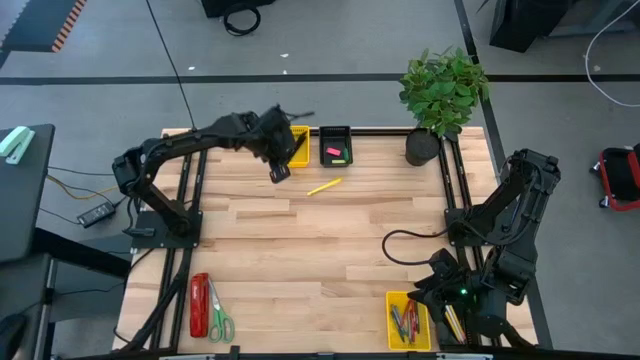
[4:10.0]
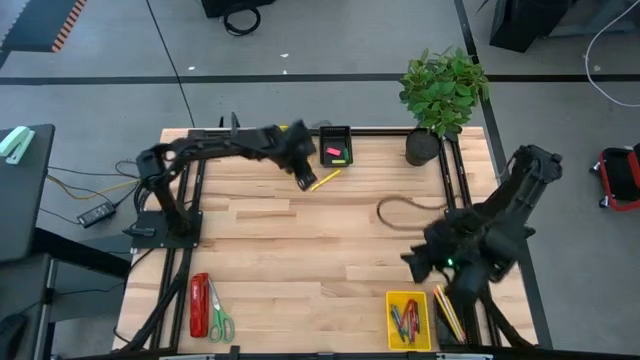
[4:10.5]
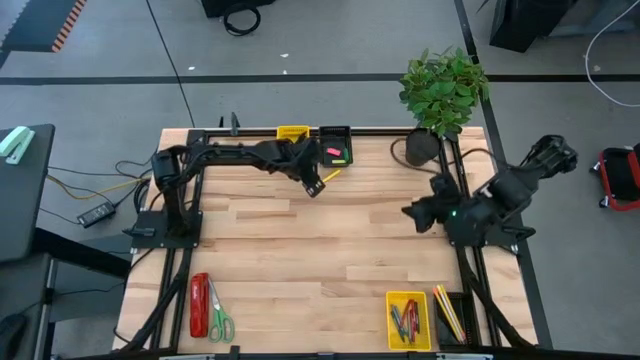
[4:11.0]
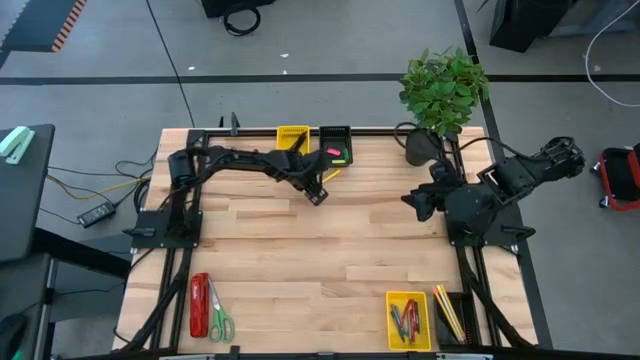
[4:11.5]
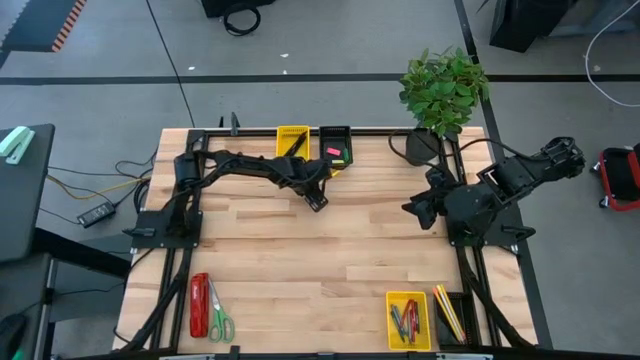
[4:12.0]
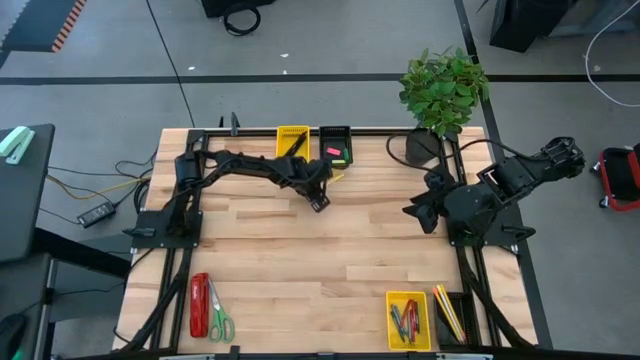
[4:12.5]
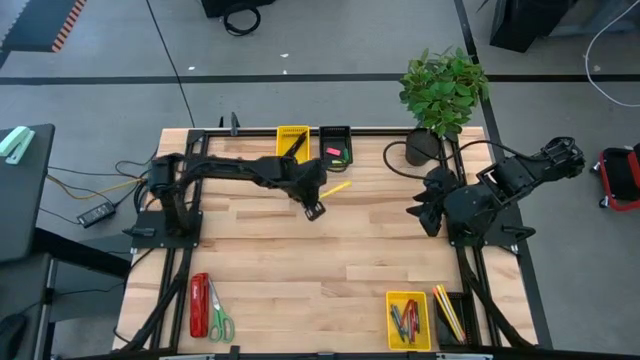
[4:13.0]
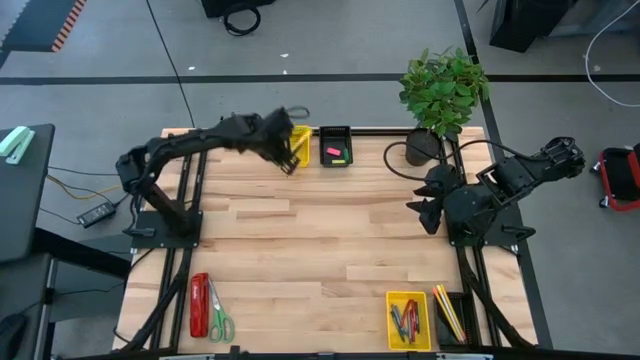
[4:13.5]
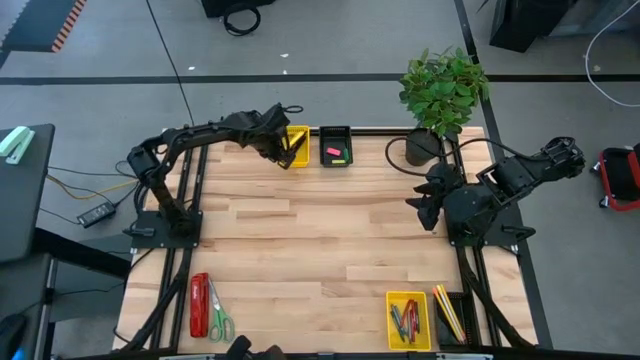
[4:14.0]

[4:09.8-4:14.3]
Task: Sort crayons/erasers/pens/pencils in bins
Put the yellow pen into the top yellow bin

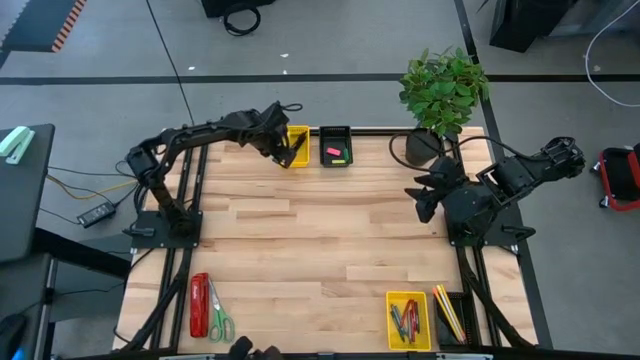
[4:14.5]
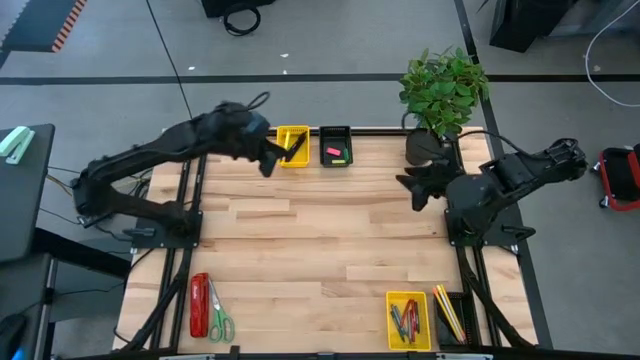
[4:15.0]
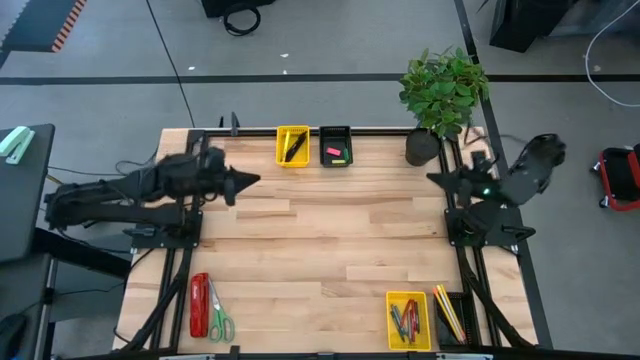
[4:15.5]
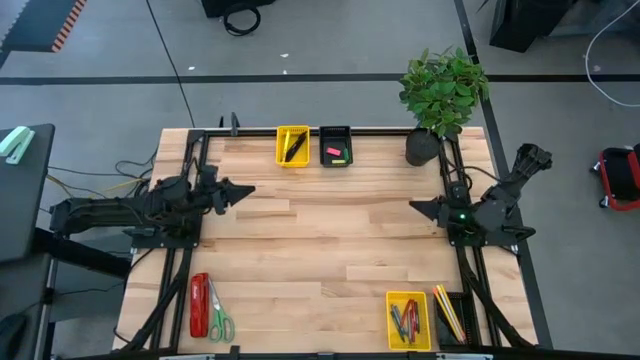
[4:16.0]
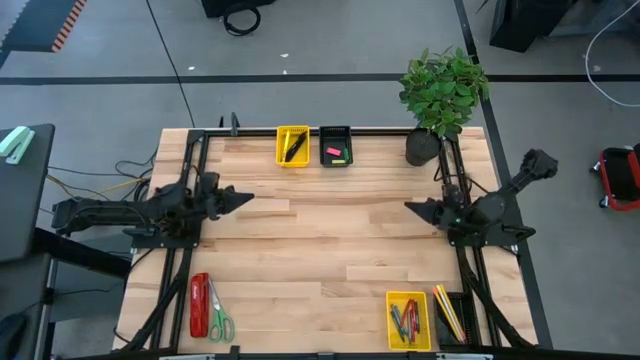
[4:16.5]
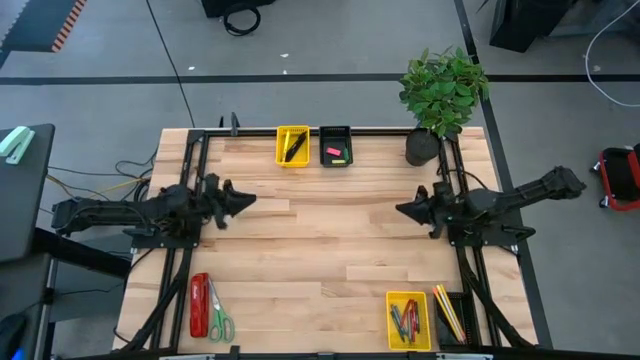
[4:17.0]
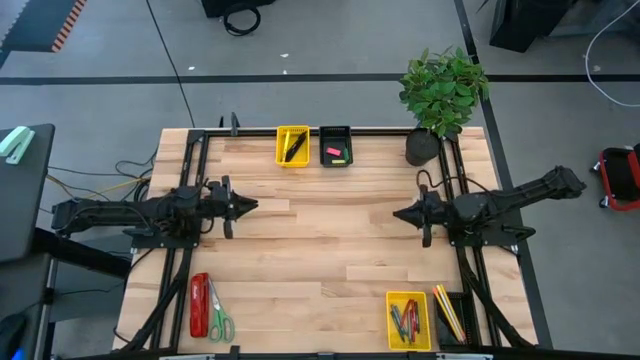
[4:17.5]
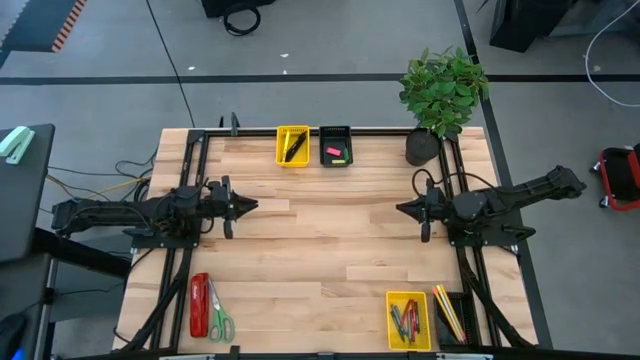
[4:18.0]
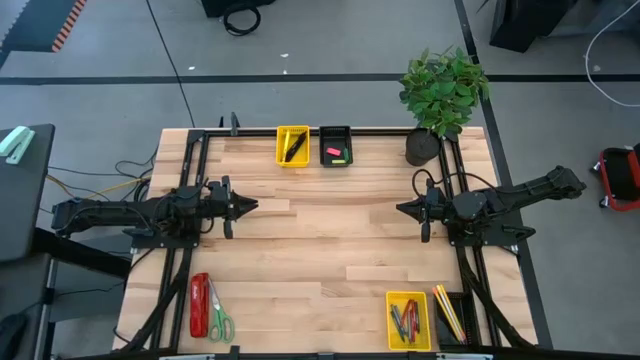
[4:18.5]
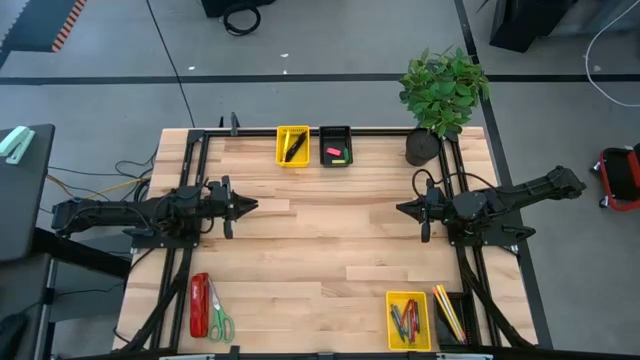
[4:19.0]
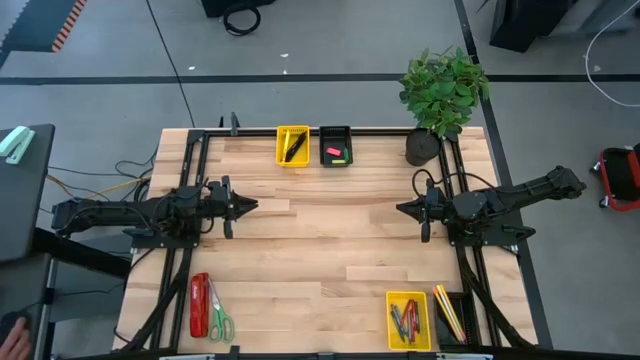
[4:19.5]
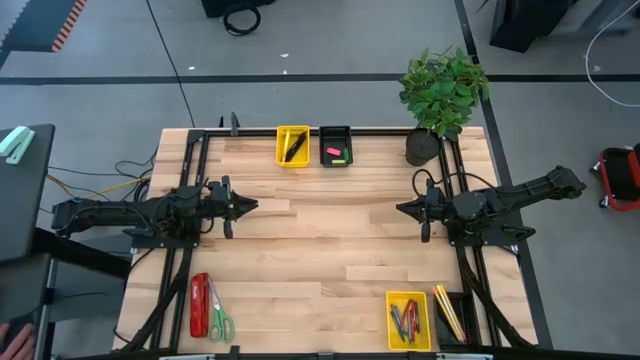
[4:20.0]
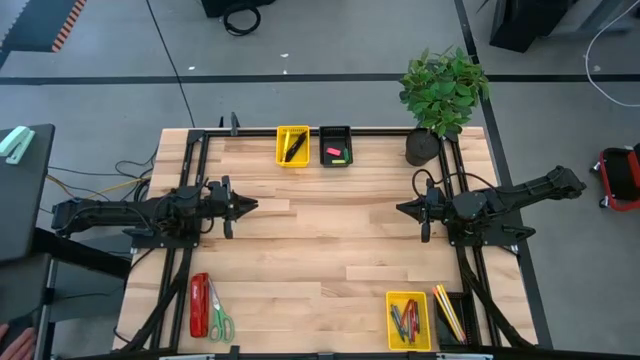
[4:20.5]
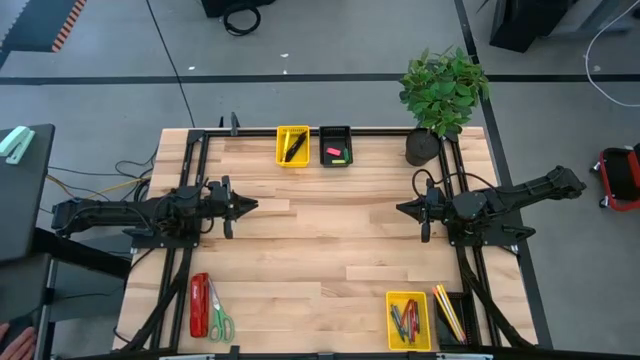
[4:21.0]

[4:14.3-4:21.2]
Return to Home Position

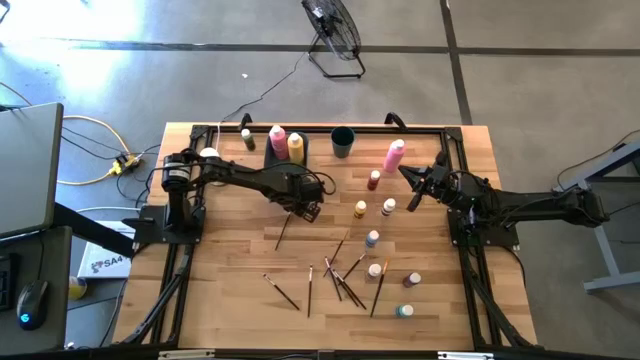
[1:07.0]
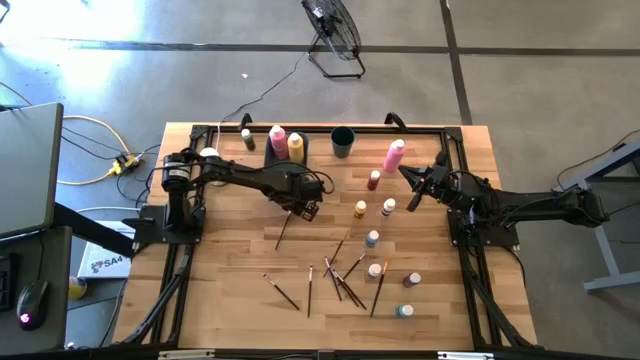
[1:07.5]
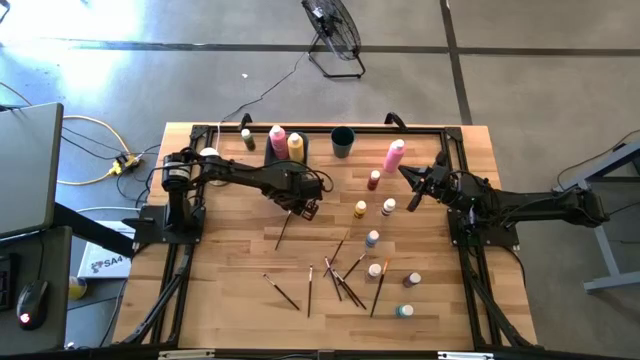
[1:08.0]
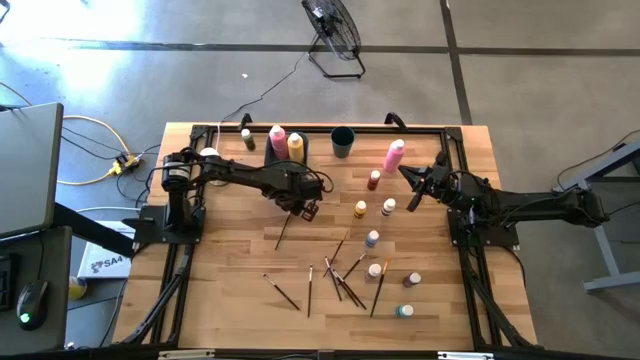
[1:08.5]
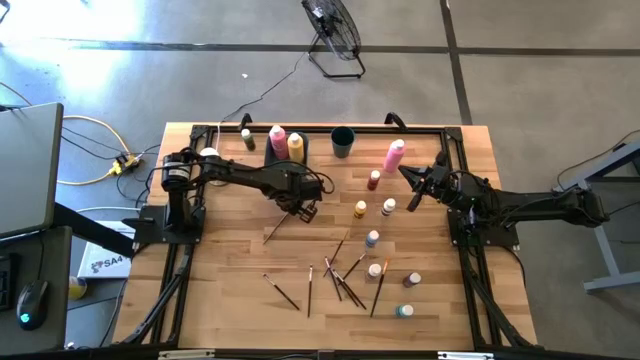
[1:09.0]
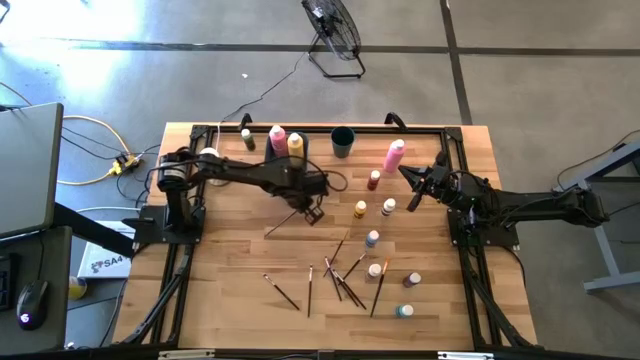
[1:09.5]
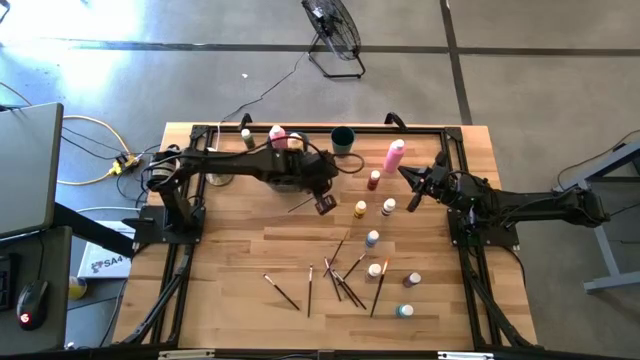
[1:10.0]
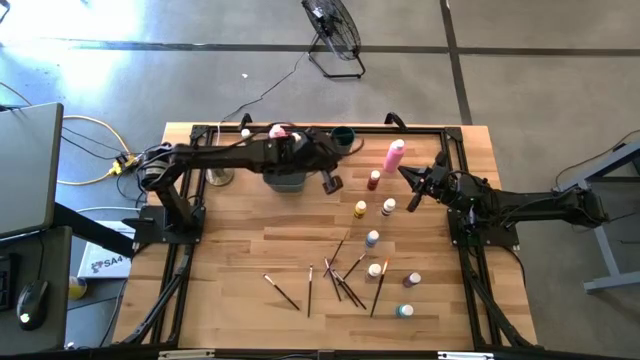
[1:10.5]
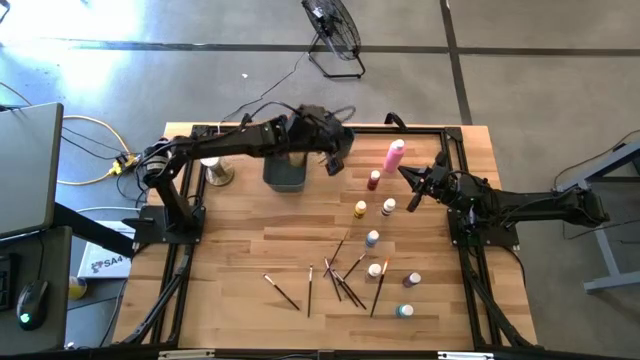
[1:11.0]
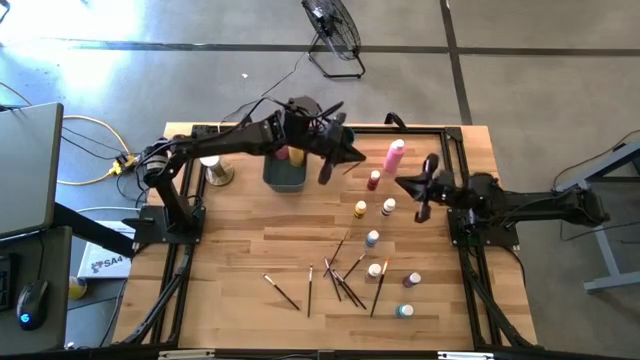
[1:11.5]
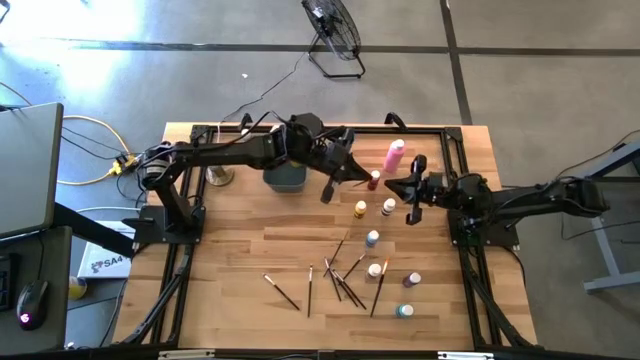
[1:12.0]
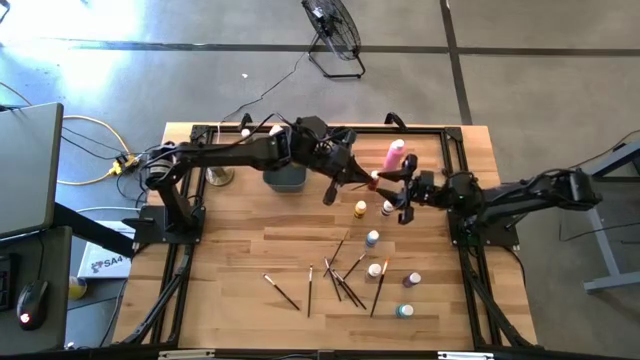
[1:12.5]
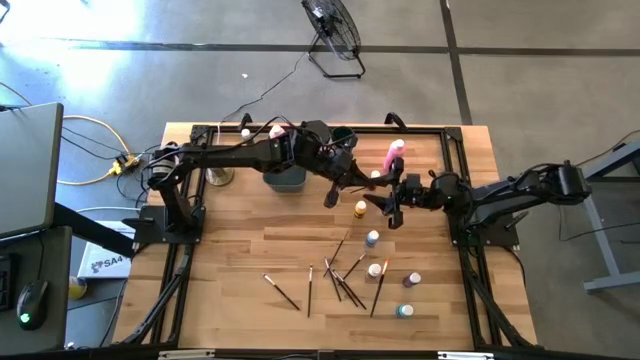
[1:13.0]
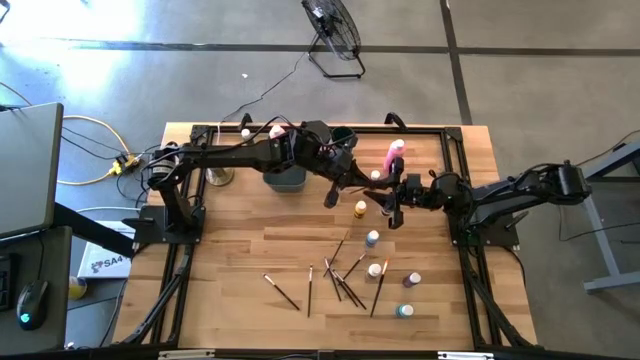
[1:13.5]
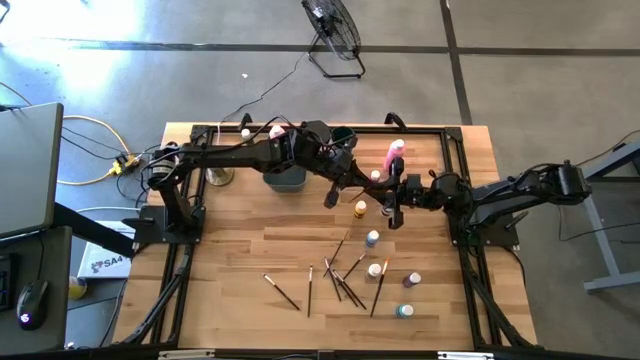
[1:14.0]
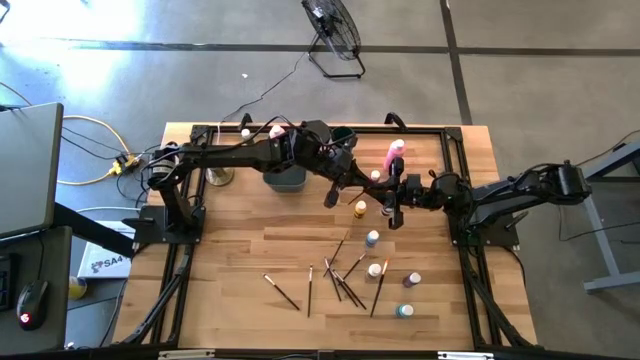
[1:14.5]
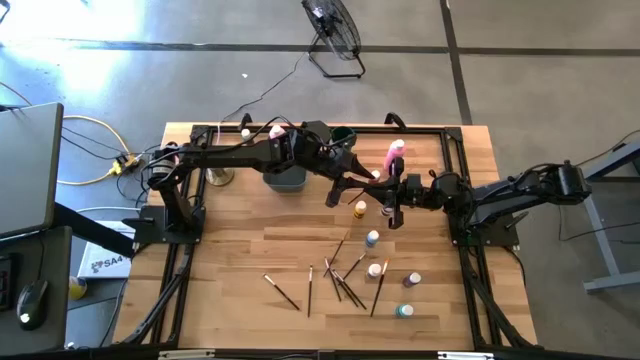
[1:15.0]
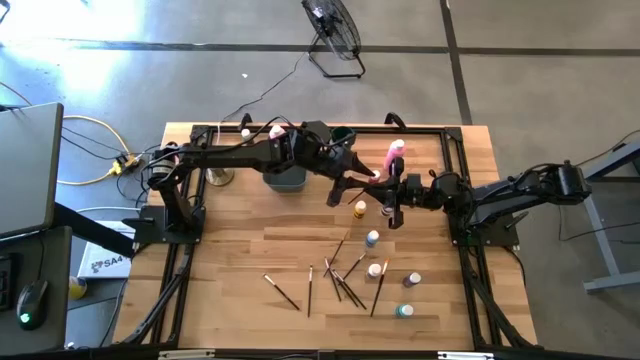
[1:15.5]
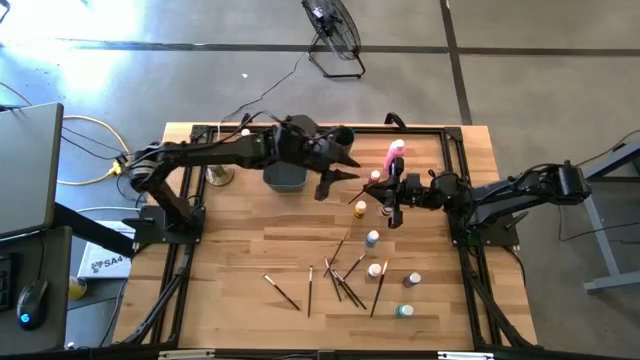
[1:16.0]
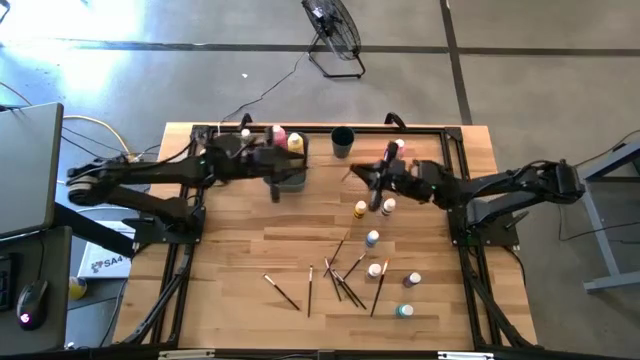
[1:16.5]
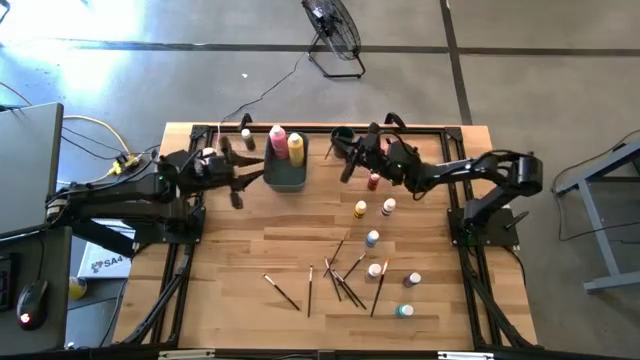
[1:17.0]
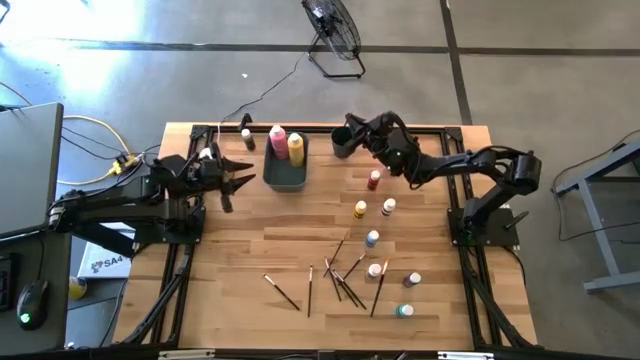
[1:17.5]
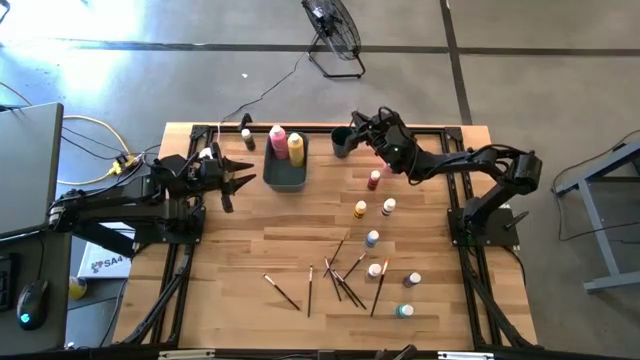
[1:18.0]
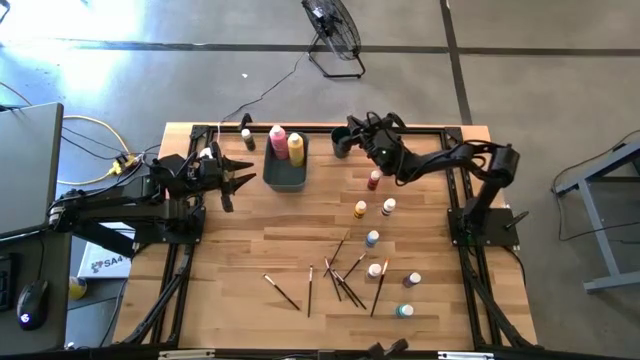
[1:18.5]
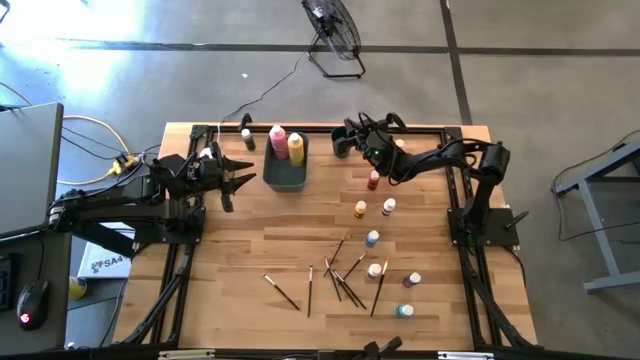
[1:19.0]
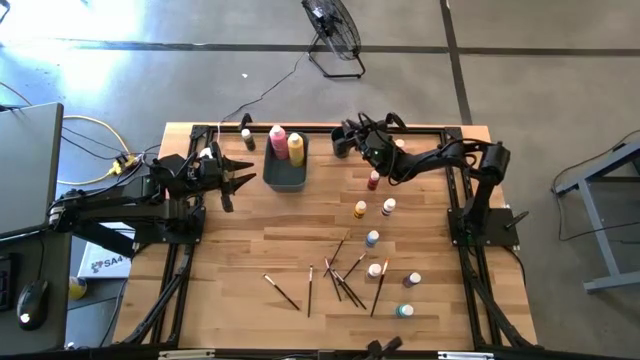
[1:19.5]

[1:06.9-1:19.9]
Task: Pick & Place Paint Supplies
Put the gold paint brush into the green cup
